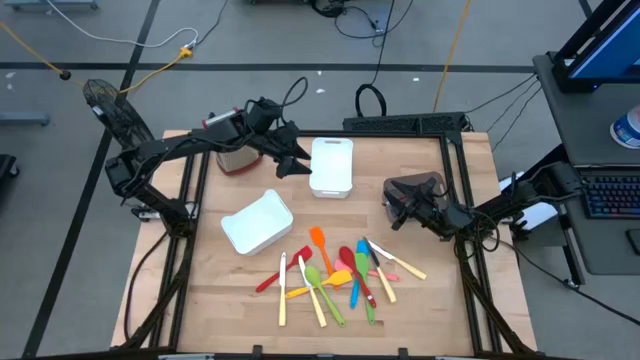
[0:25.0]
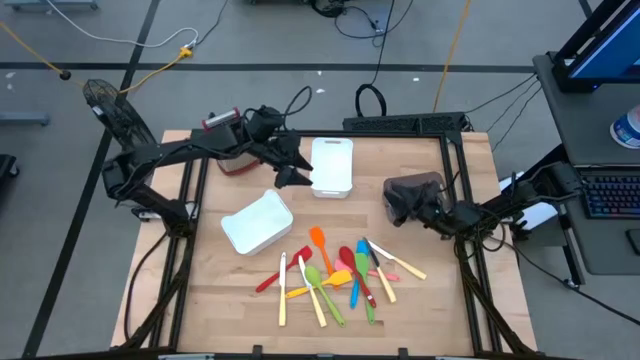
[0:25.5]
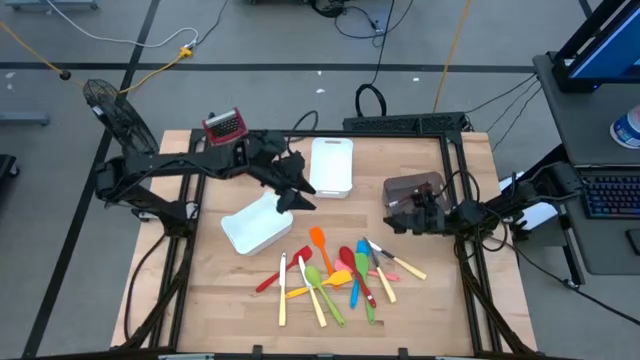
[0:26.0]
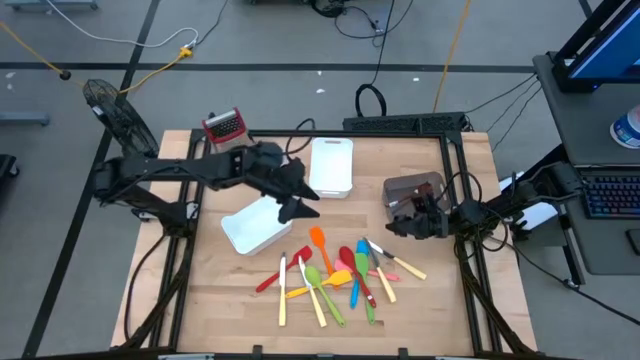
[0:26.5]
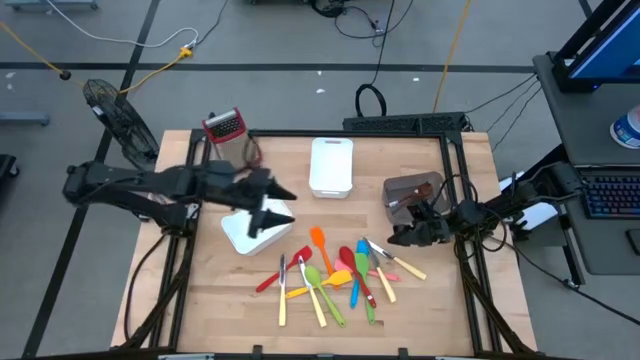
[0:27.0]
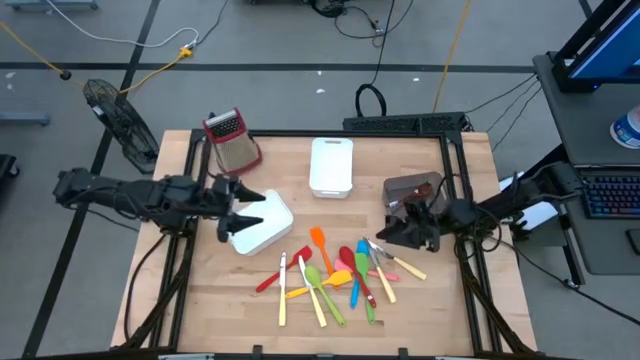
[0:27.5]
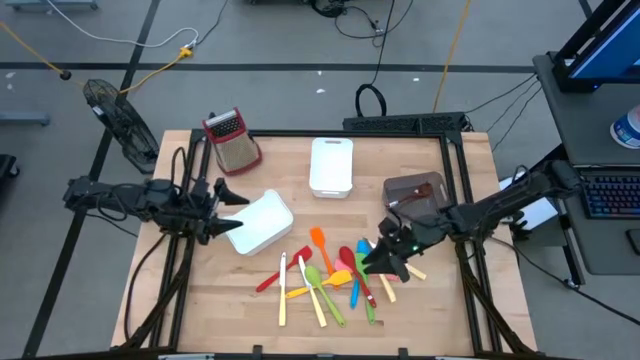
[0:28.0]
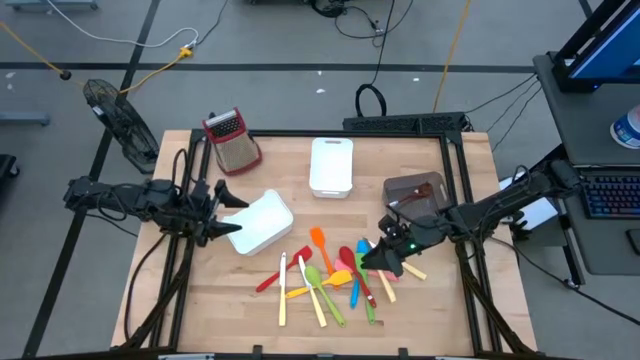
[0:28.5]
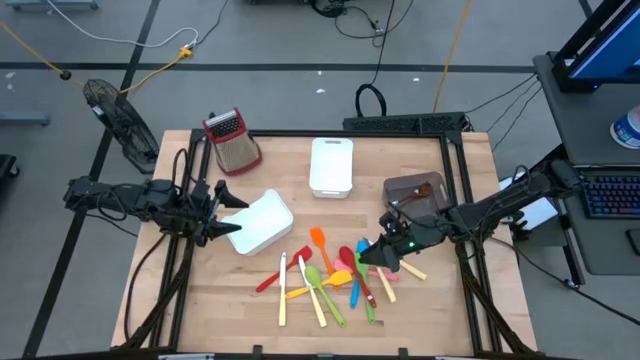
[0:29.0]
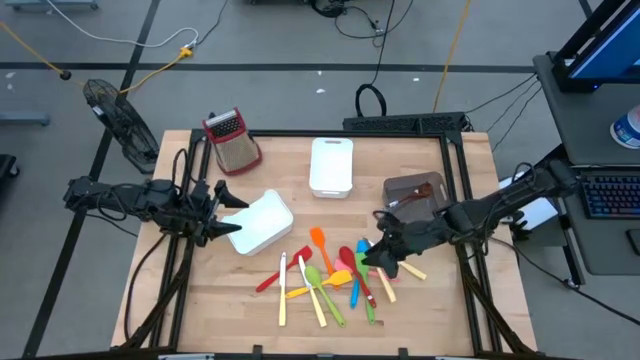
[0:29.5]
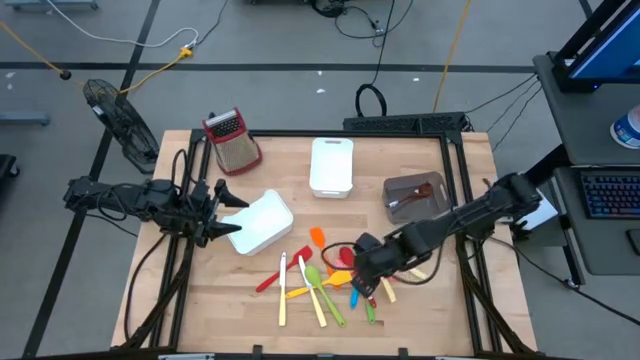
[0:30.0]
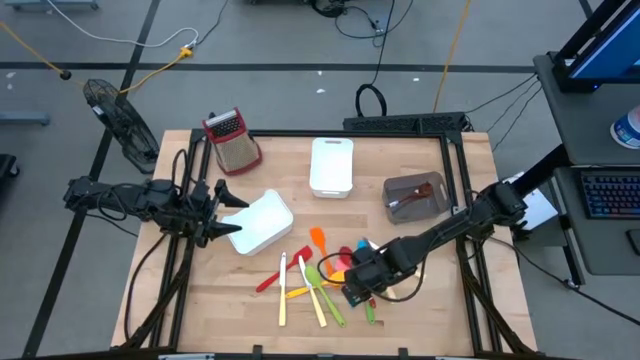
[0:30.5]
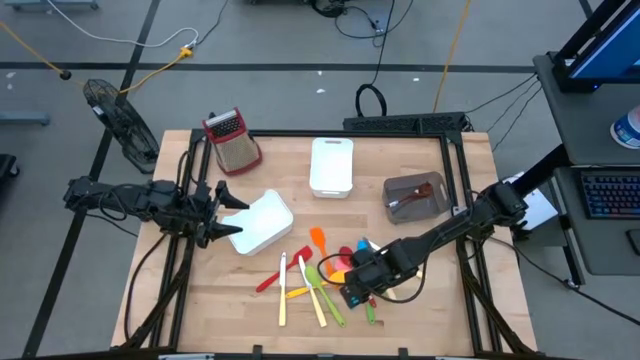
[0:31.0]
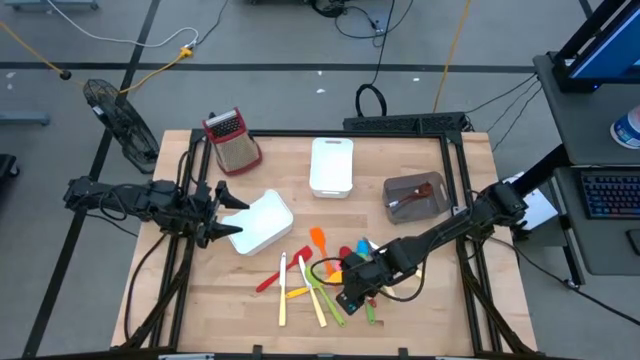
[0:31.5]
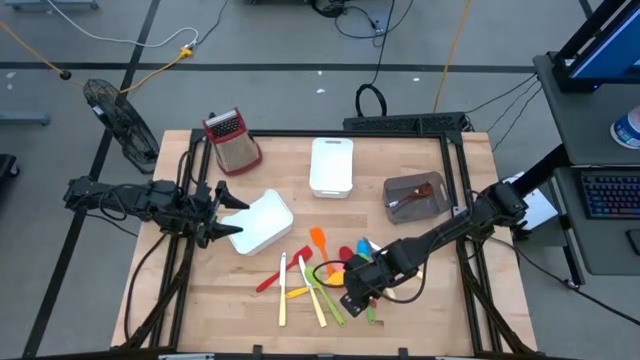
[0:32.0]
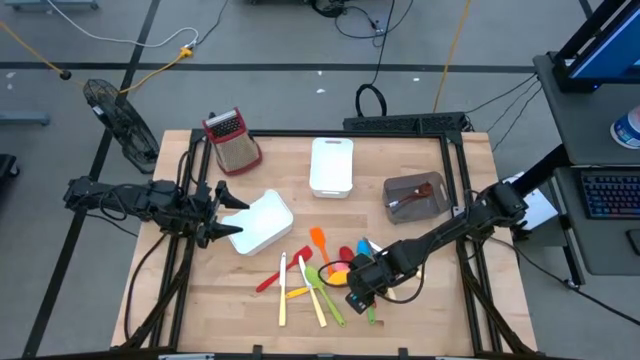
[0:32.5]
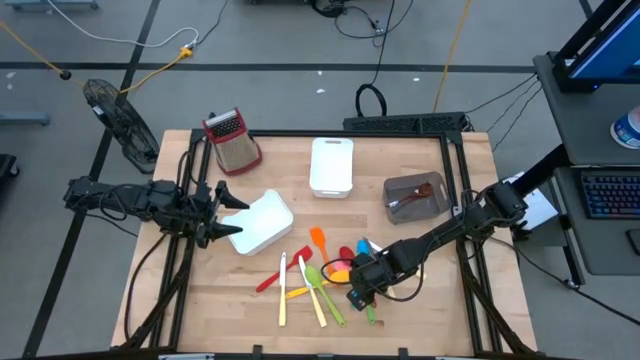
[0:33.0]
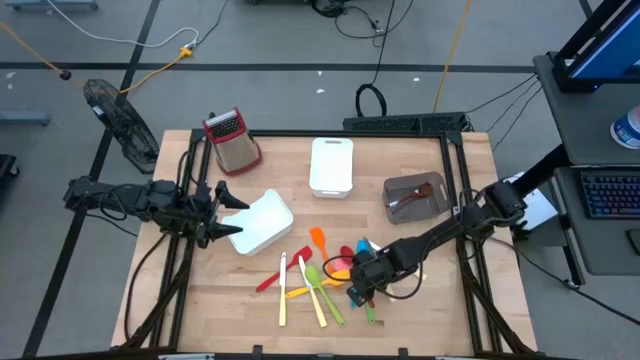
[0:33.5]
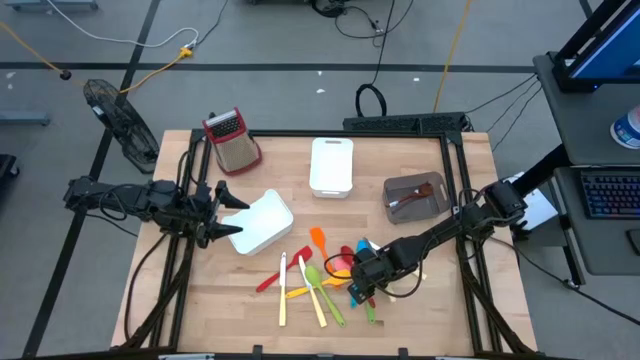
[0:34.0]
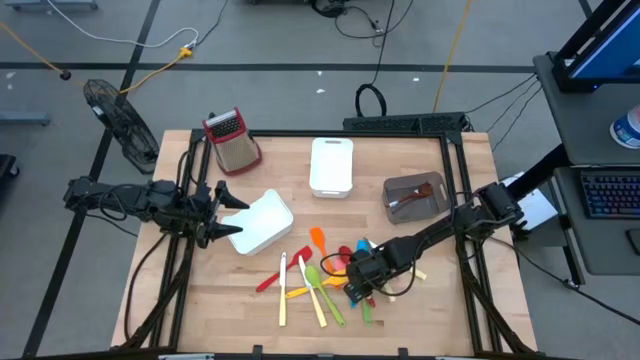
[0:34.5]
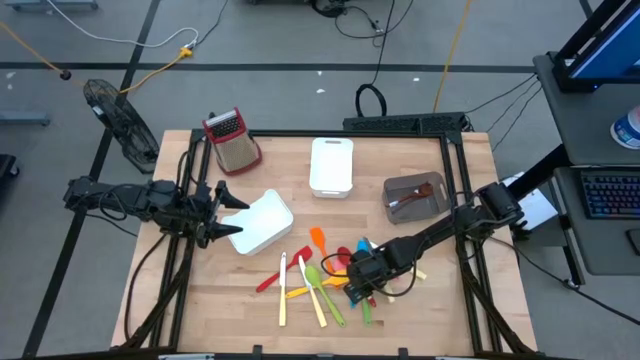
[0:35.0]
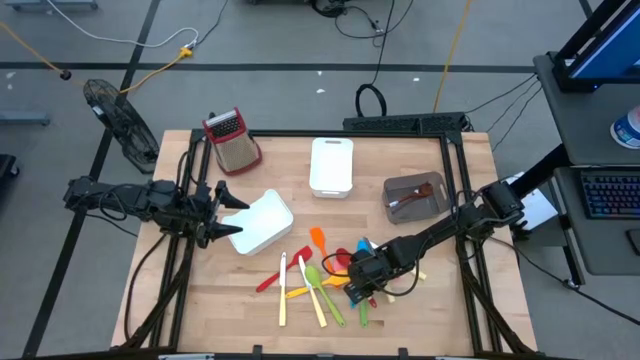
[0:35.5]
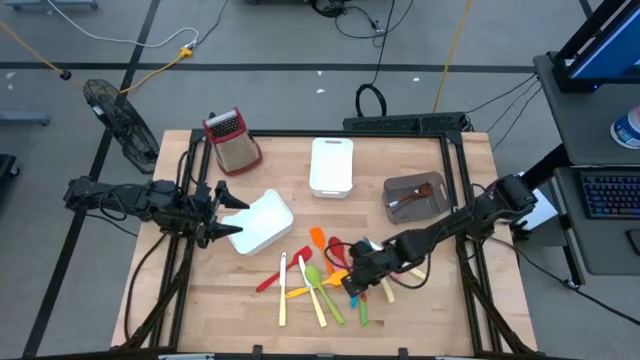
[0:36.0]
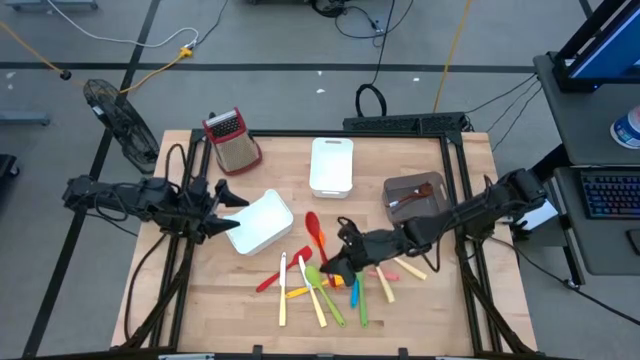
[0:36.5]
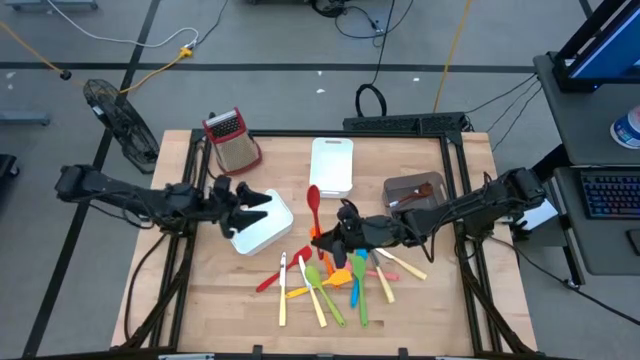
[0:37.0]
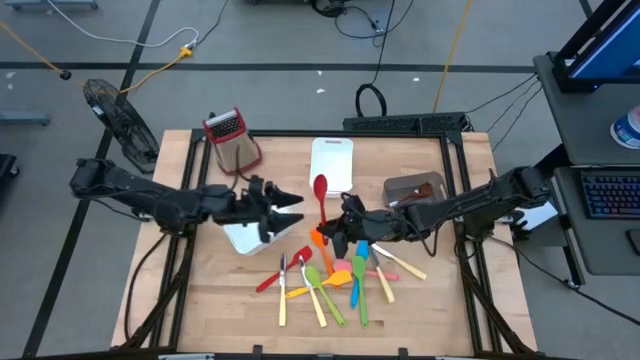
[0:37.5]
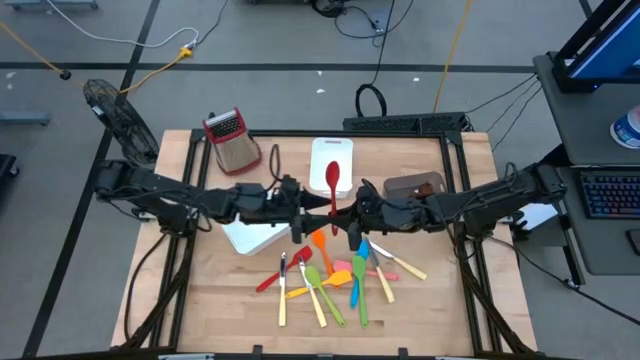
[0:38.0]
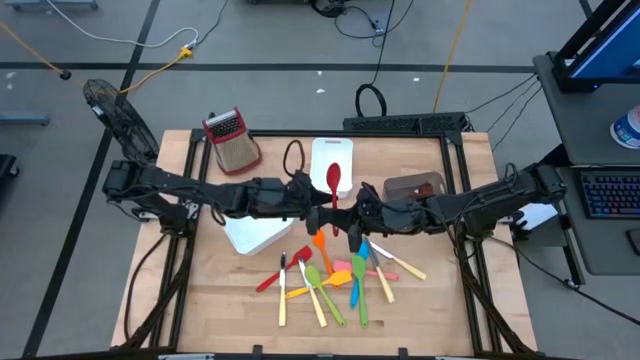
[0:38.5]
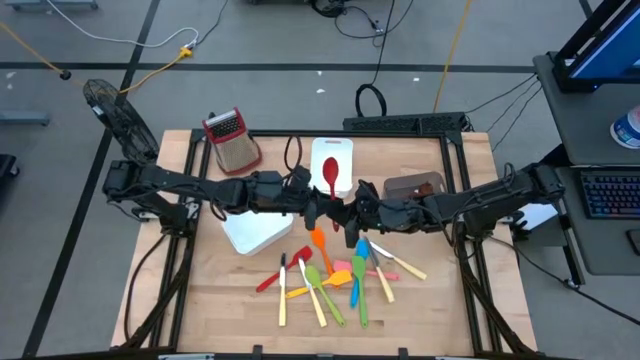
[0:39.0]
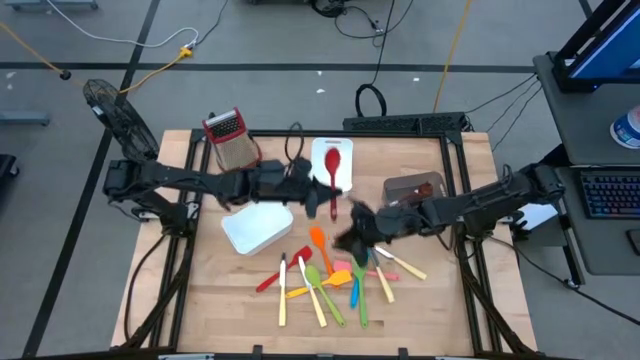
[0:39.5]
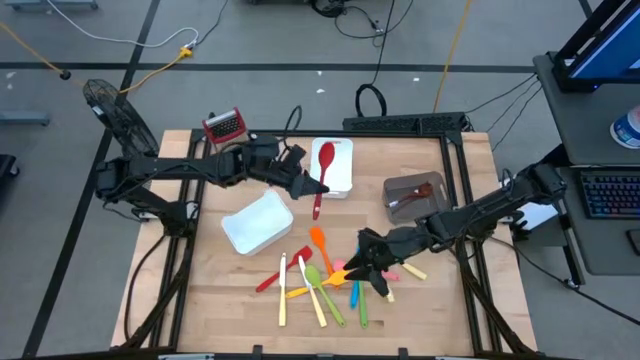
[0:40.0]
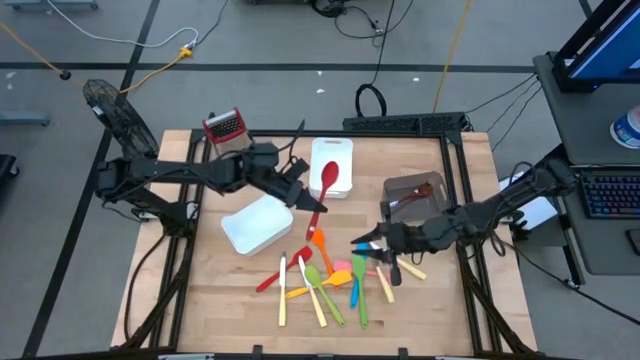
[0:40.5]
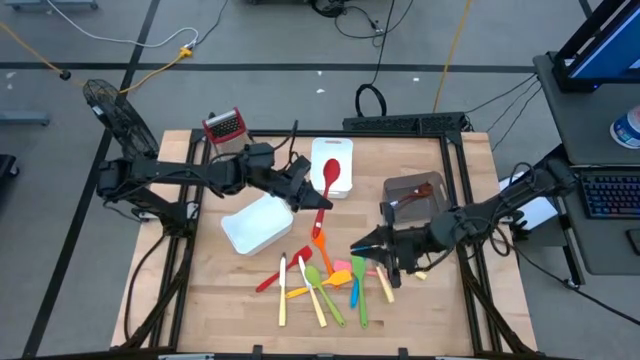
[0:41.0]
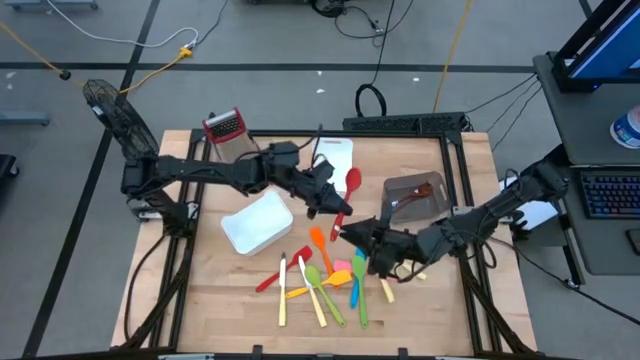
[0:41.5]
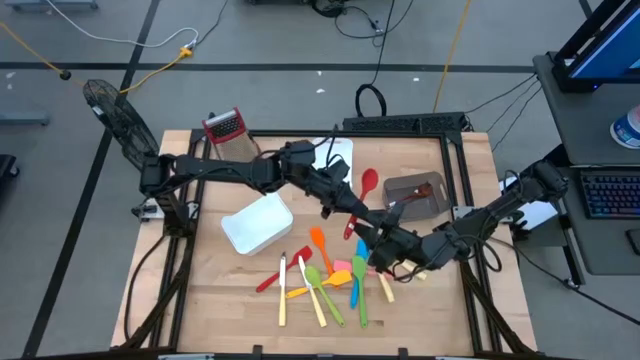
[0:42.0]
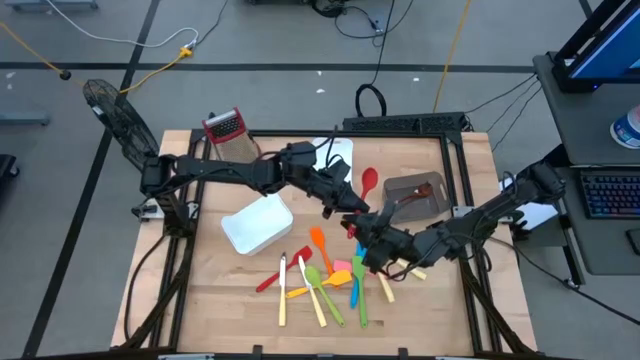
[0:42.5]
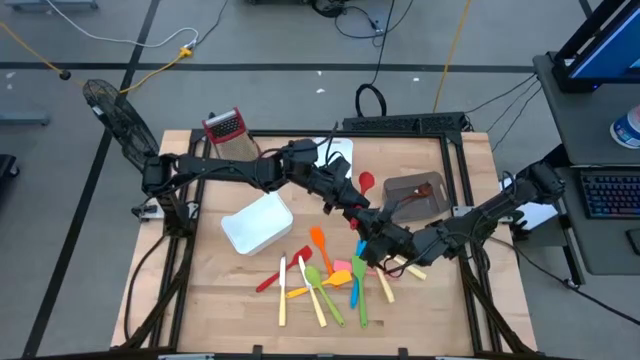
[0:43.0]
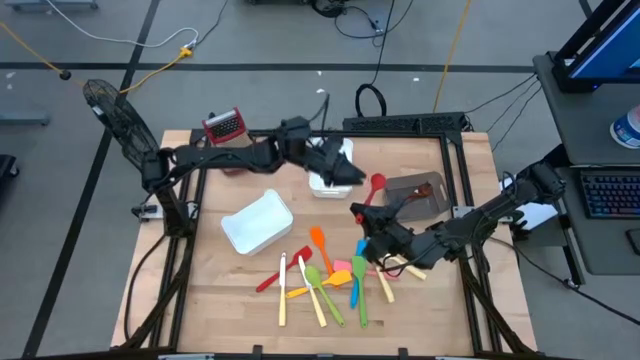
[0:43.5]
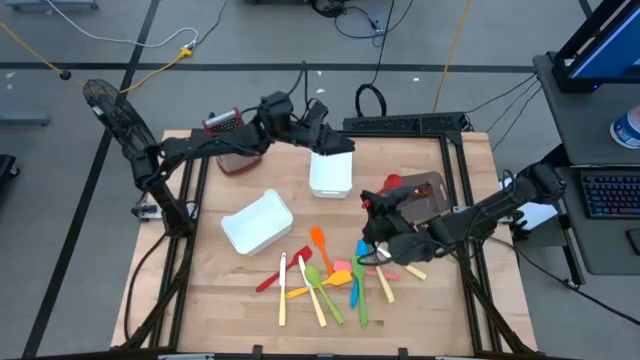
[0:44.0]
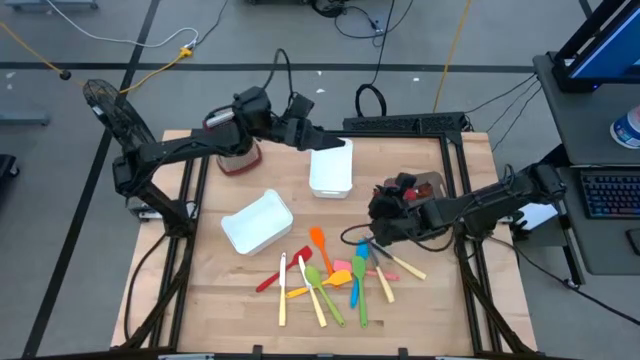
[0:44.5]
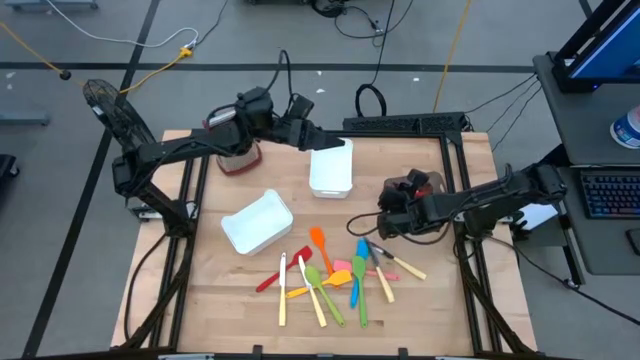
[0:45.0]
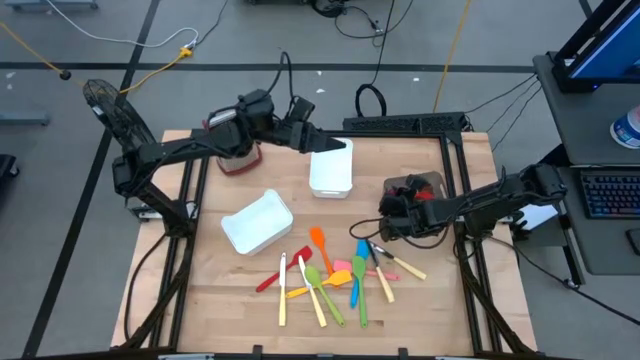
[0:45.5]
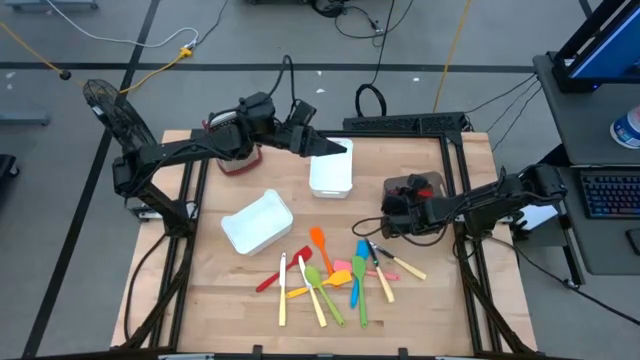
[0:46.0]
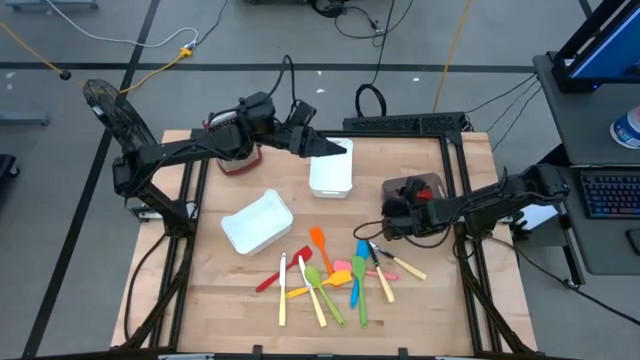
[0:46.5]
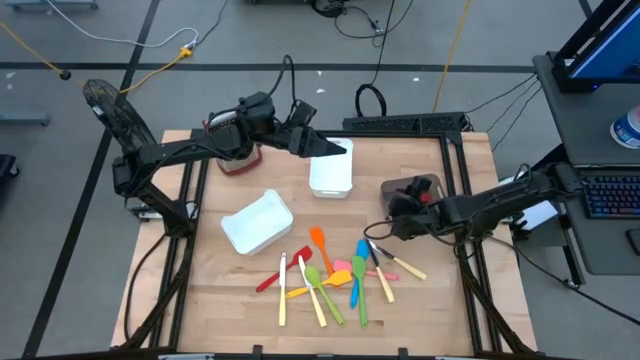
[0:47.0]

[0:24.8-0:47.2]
Task: Pick & Place Kitchen Items
Put the red serving spoon into the black bin
